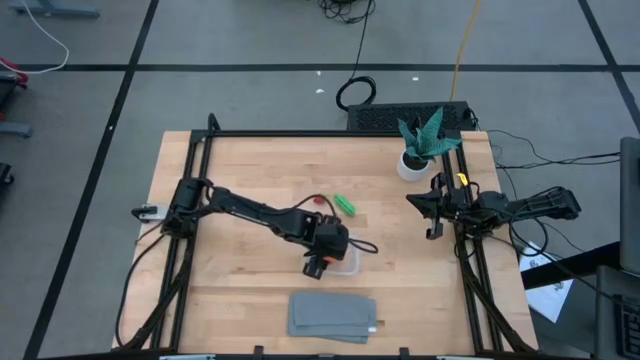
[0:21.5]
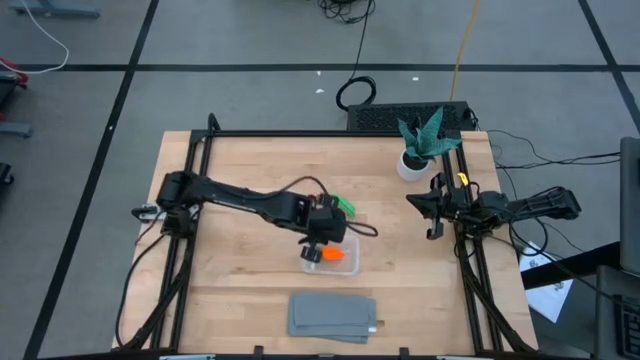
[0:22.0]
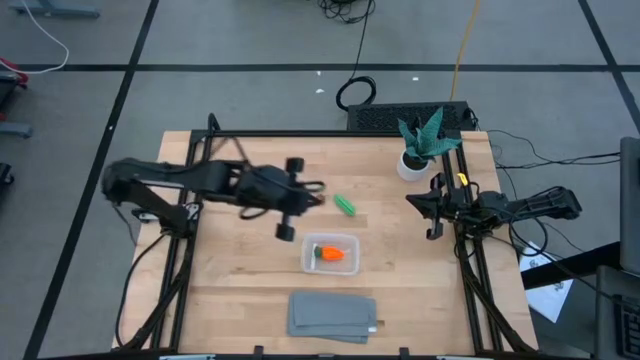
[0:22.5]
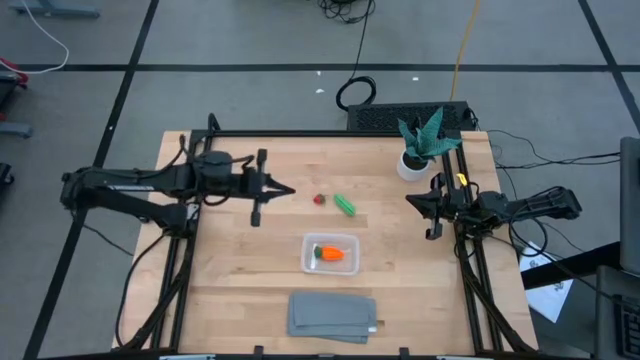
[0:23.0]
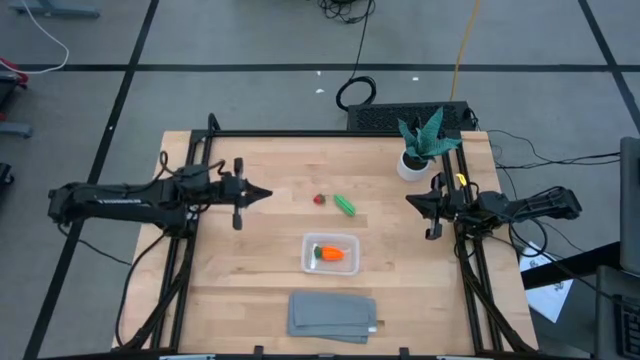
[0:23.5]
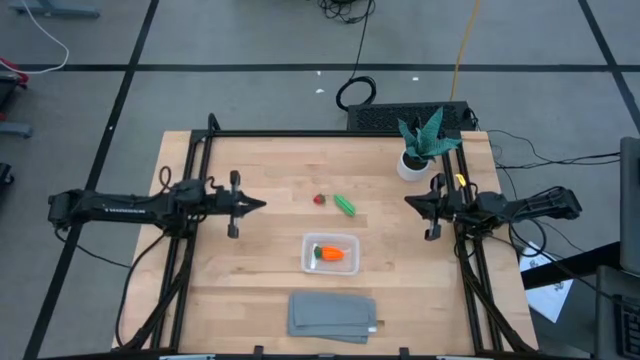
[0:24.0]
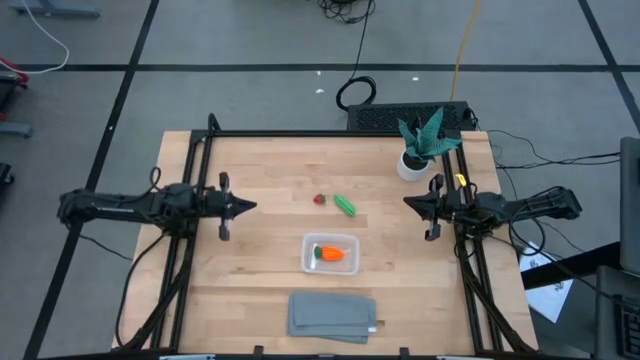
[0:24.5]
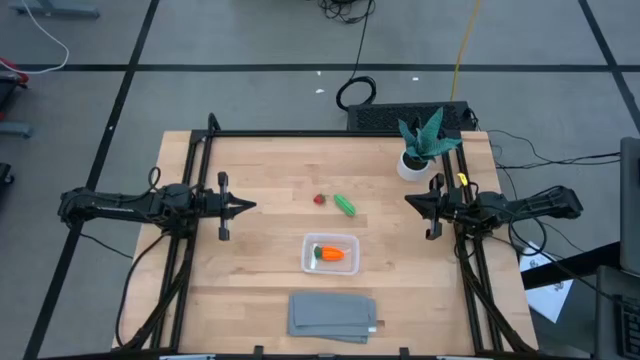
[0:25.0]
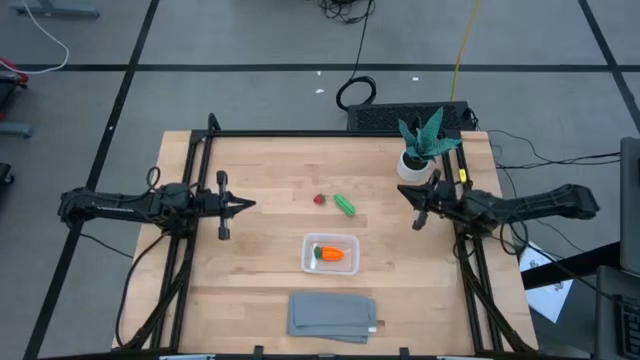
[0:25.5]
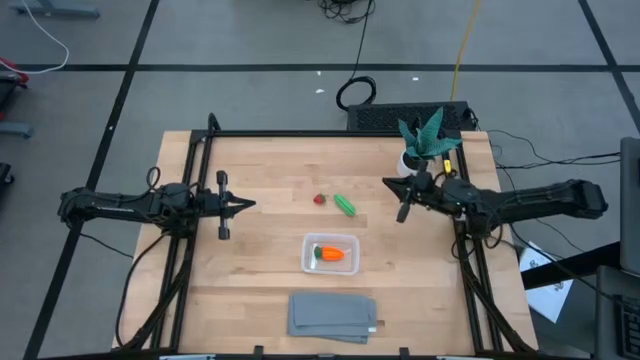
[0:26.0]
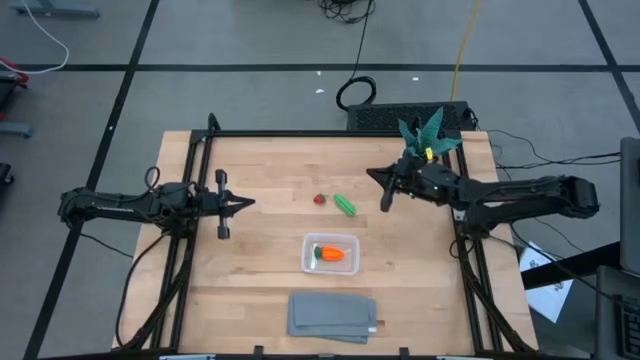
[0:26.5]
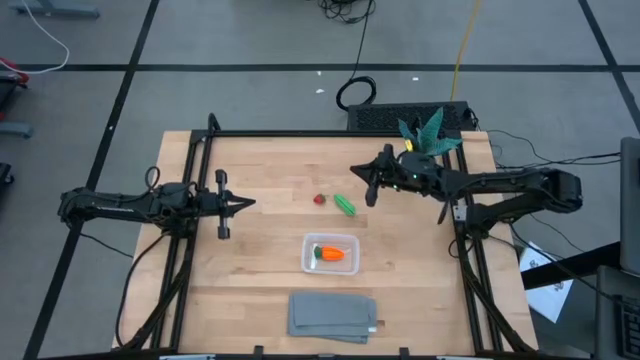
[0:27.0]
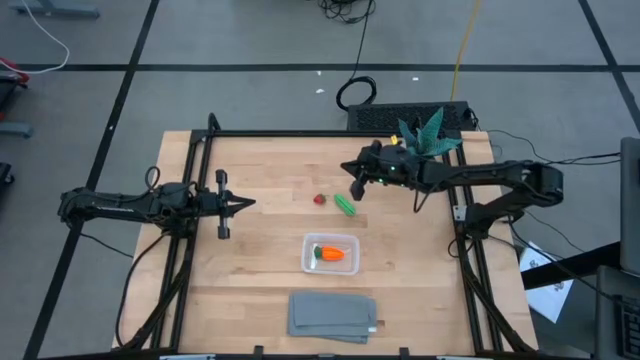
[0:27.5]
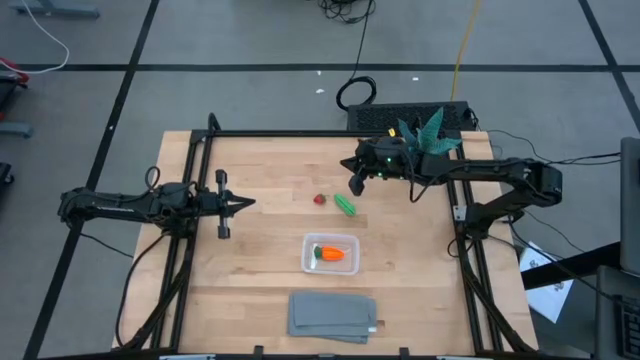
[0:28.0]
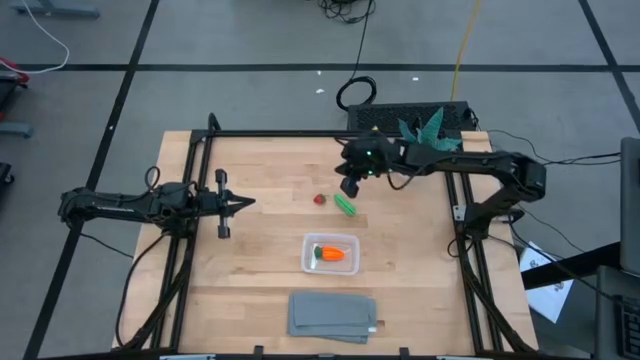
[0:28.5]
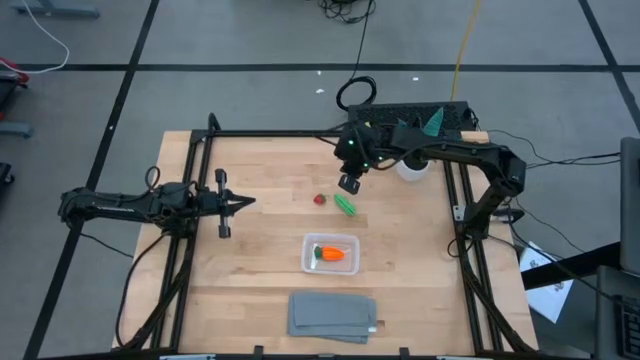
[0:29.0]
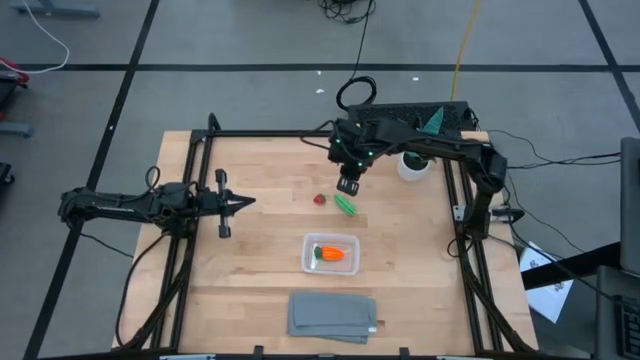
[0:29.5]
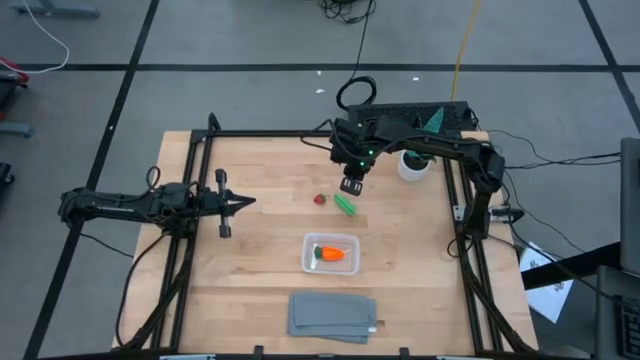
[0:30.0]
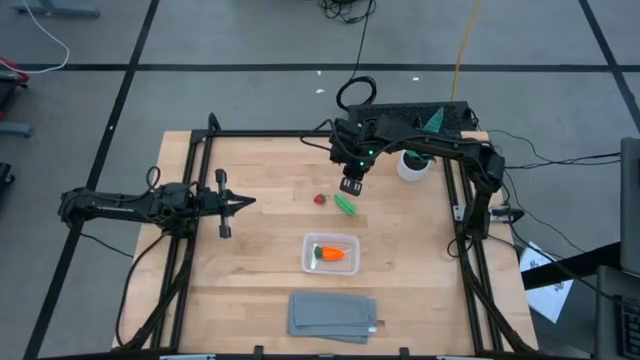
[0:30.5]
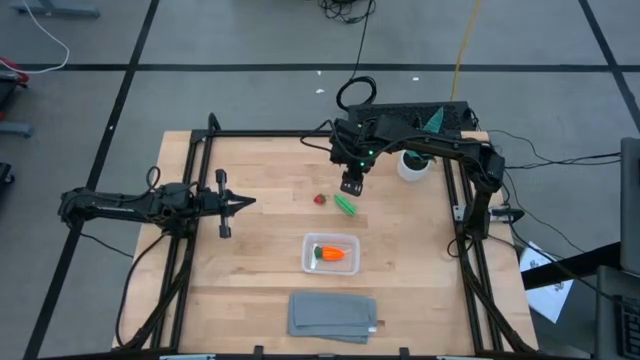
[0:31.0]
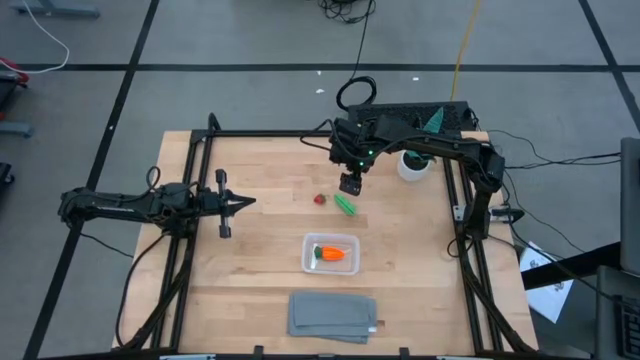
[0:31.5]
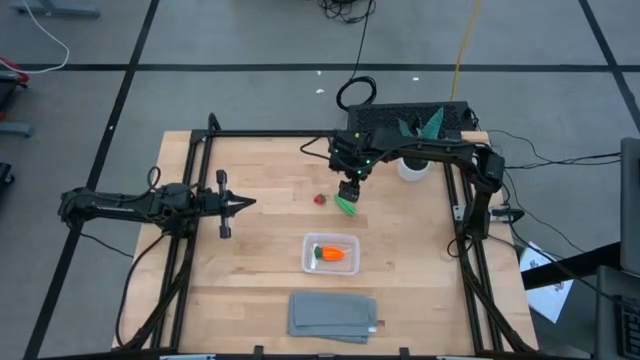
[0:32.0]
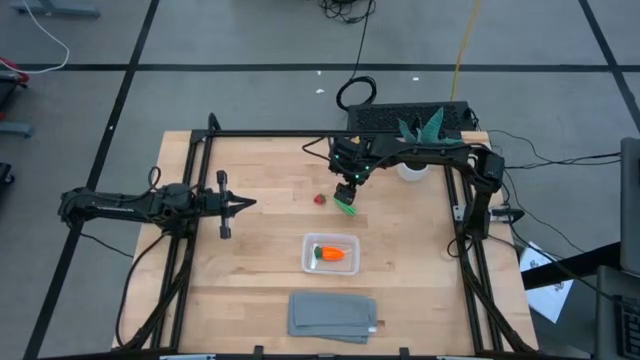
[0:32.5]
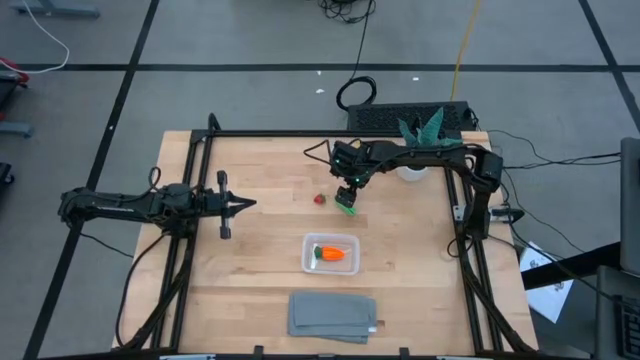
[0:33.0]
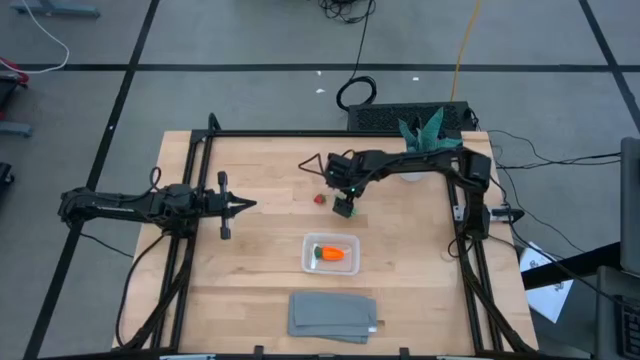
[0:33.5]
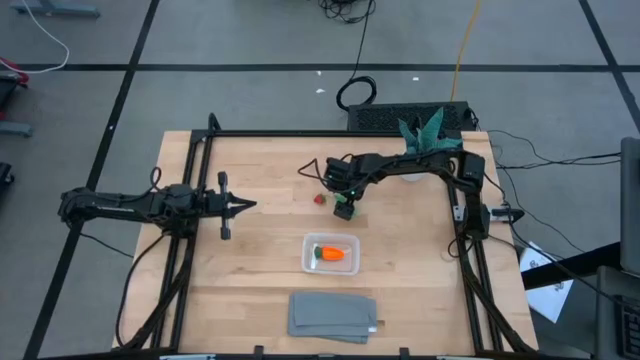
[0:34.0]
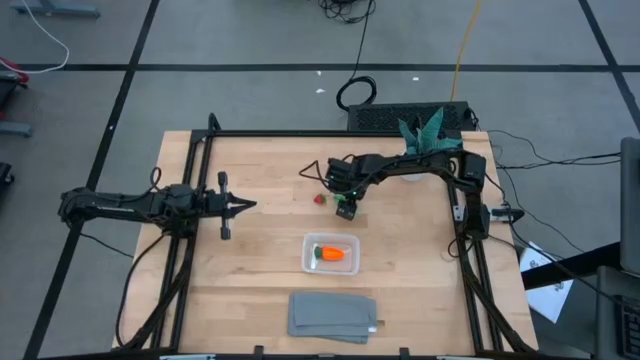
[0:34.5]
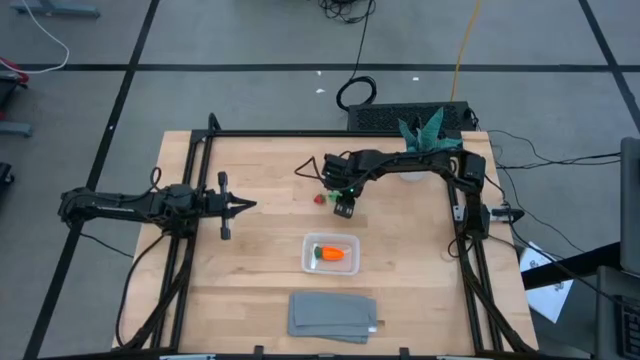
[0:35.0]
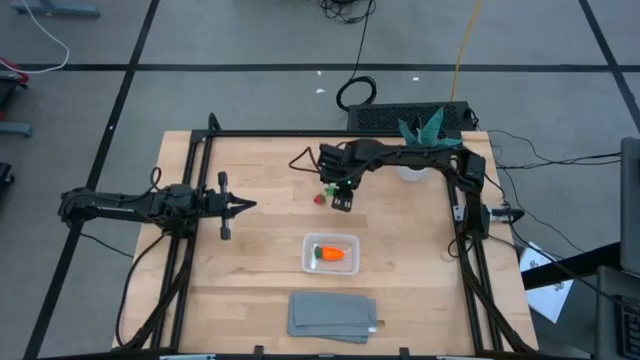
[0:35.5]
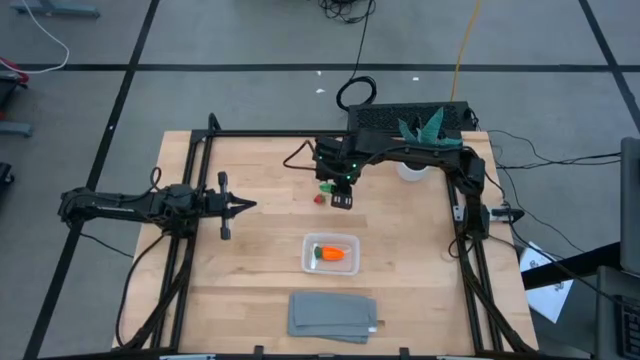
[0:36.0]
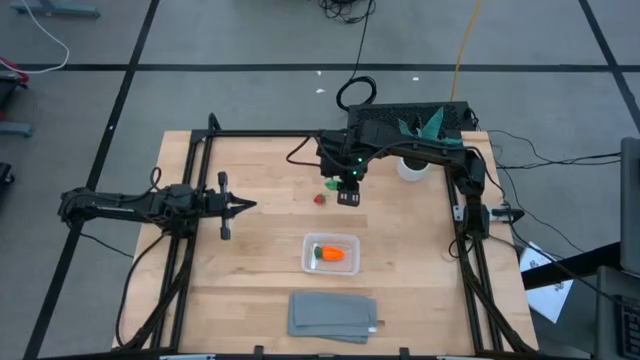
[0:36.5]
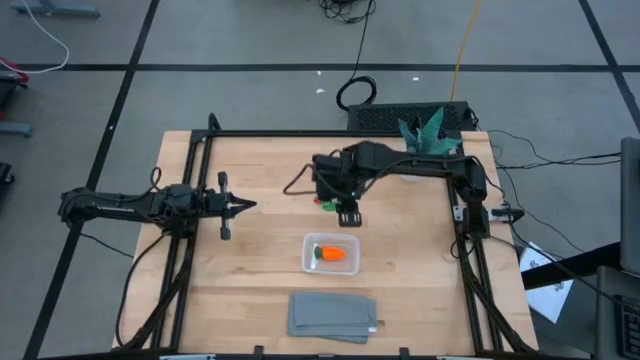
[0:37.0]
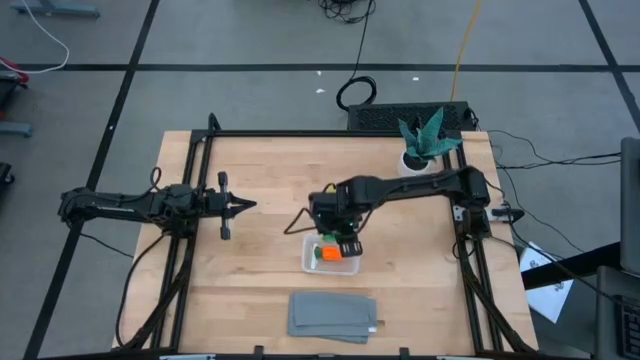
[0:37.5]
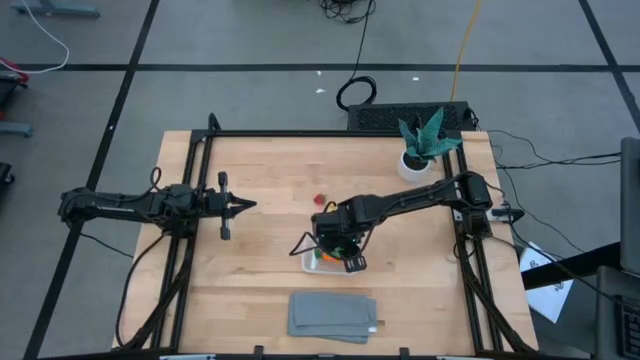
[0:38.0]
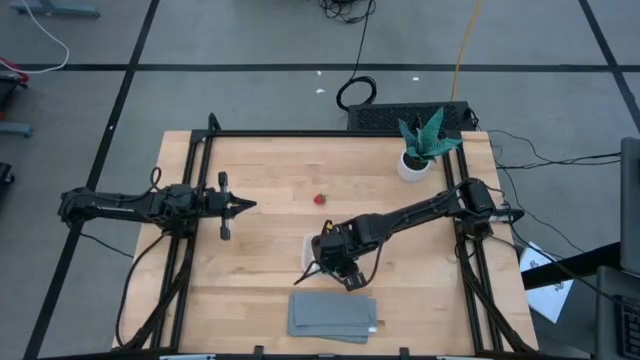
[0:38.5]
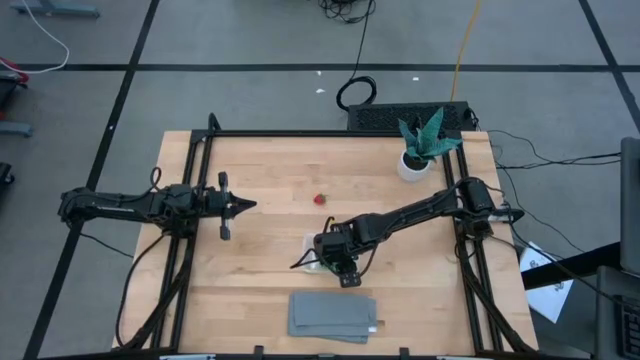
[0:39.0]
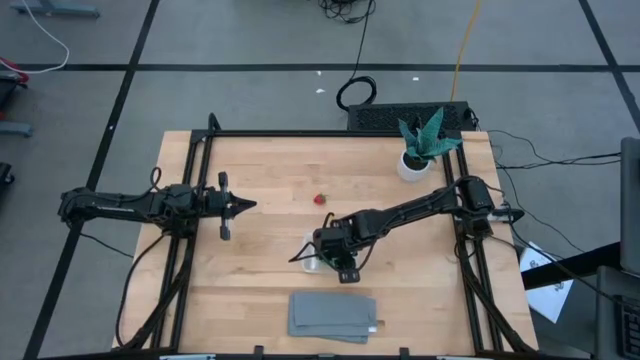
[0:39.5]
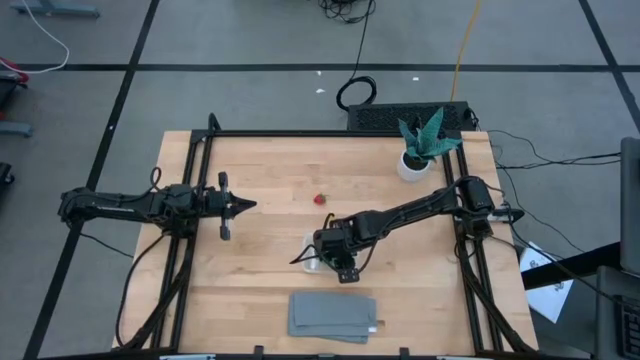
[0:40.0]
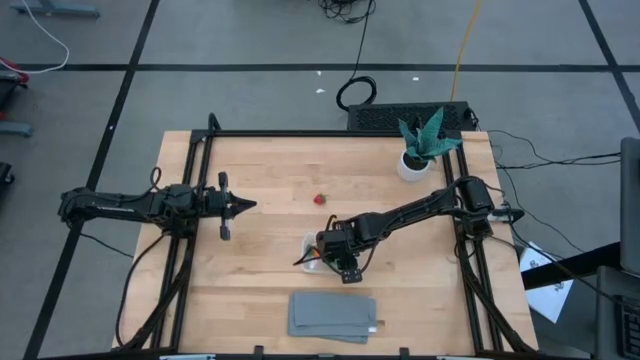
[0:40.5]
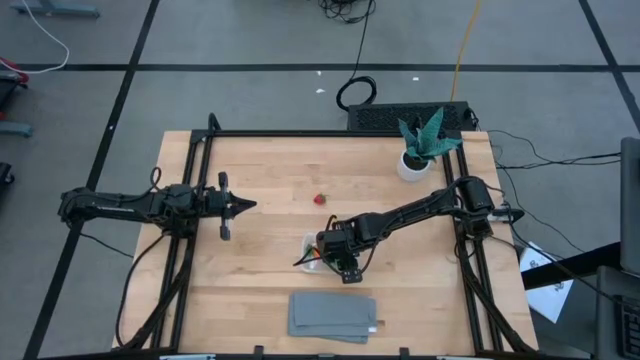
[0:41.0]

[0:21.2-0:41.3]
Task: Pick and placing Produce into tupperware
Put the green beans into the transparent bin

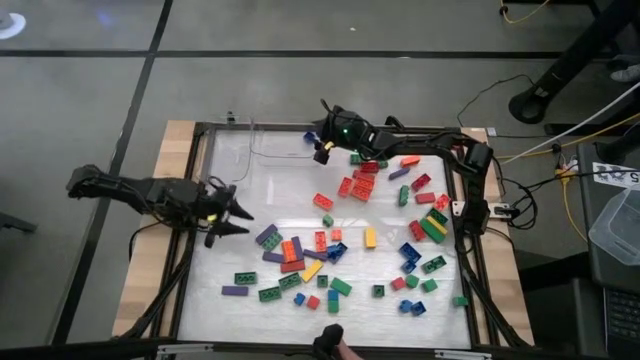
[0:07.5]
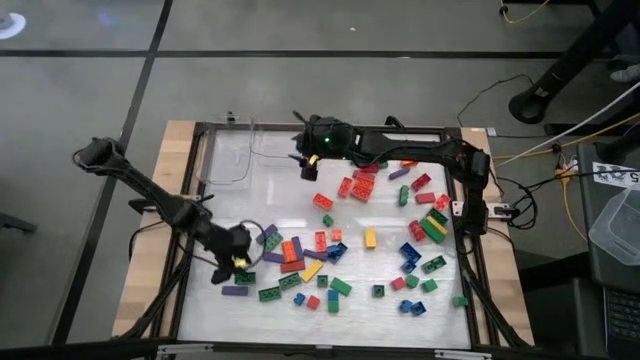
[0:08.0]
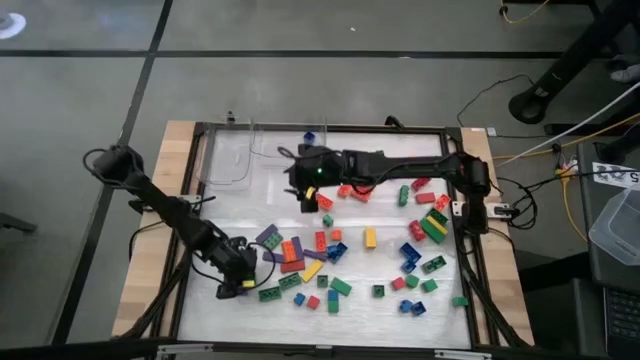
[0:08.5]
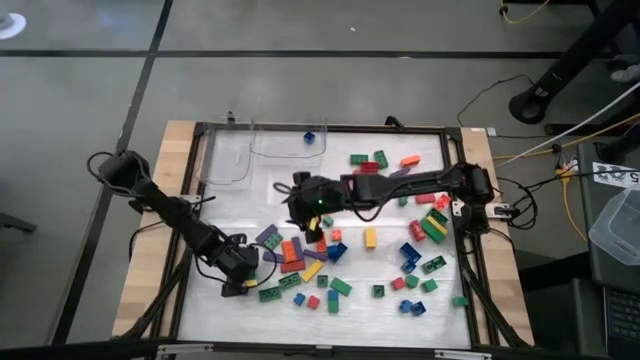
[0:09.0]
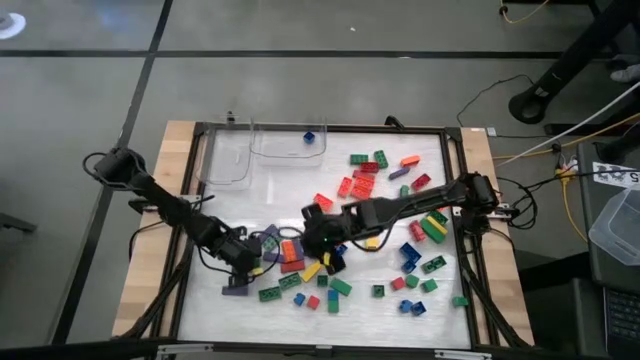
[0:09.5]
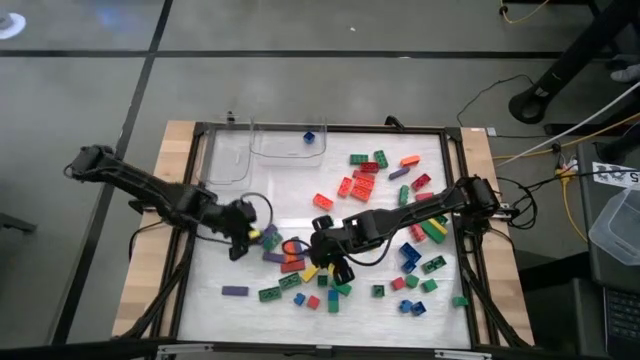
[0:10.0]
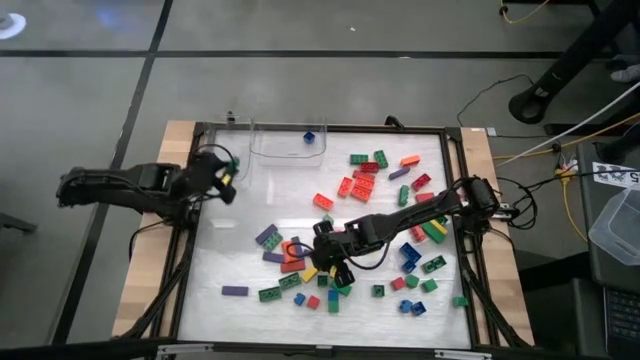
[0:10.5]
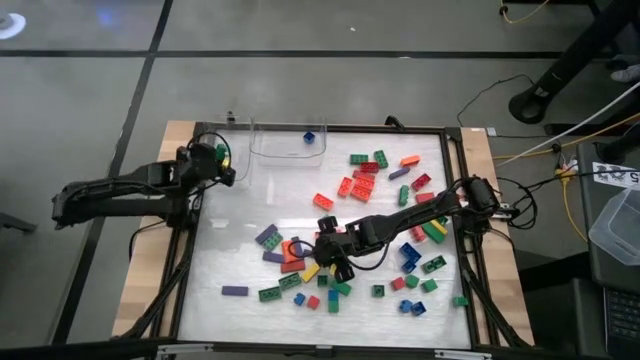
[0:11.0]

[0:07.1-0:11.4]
Task: Sort blocks by size
Put the large green game piece into the left transparent bin
